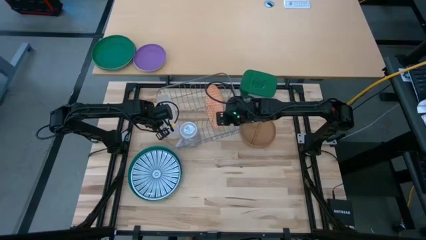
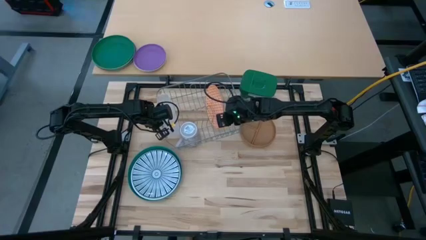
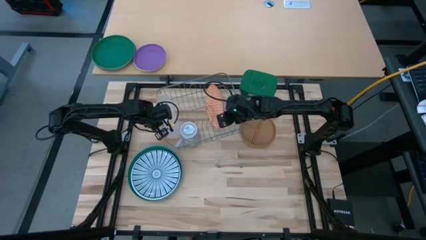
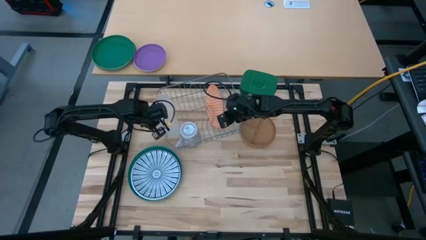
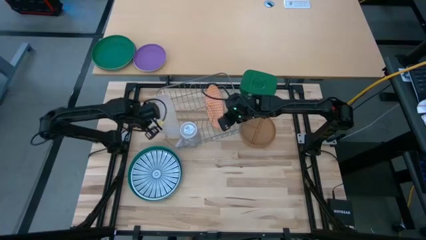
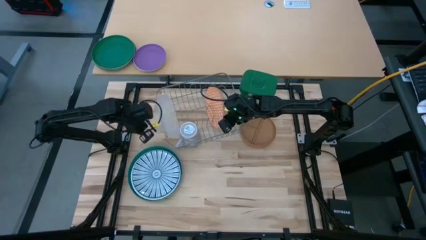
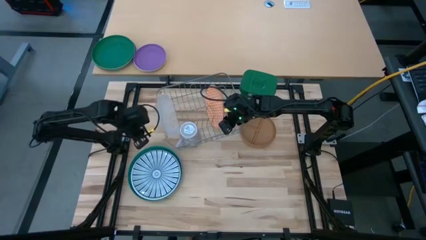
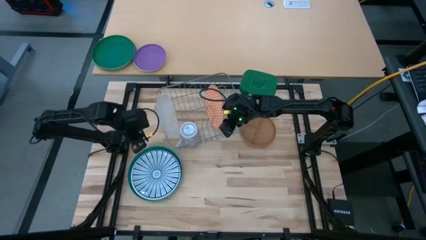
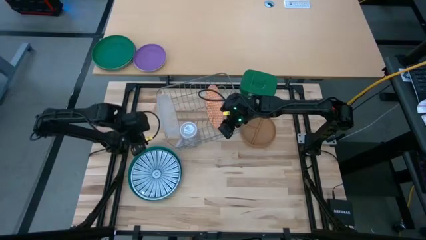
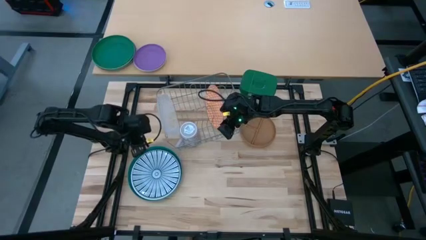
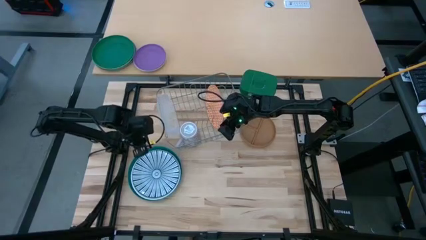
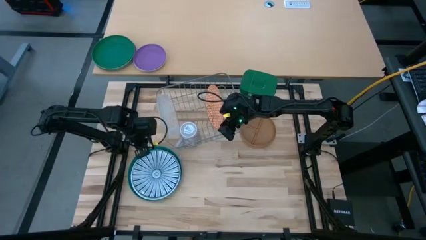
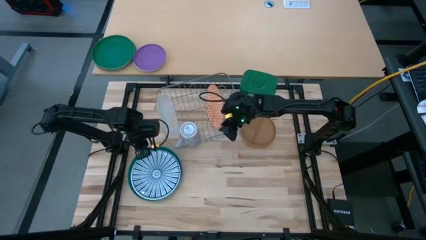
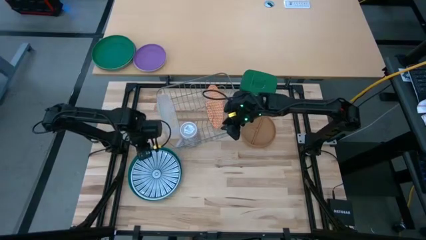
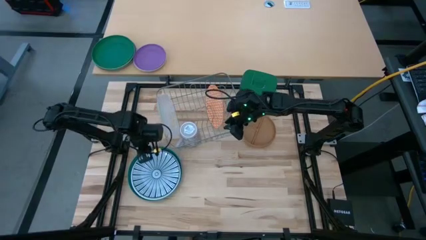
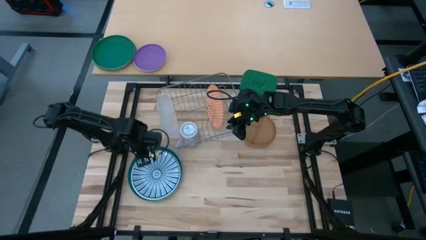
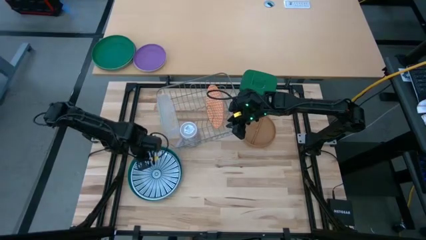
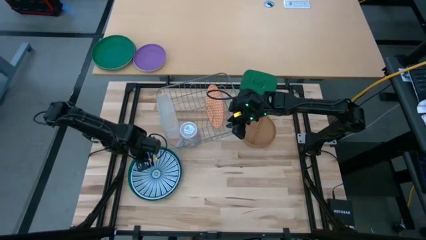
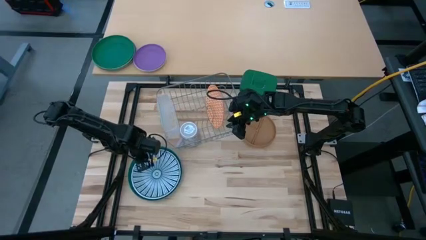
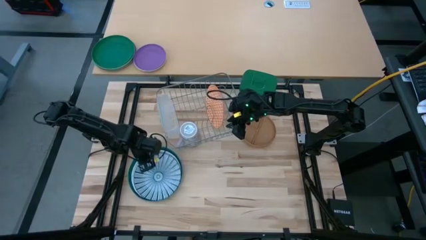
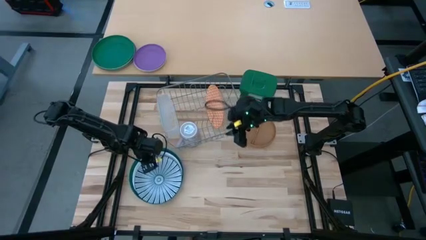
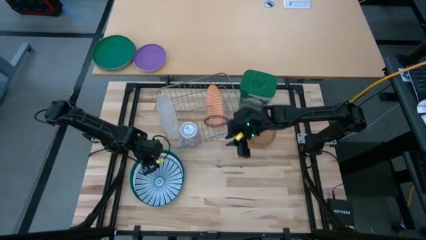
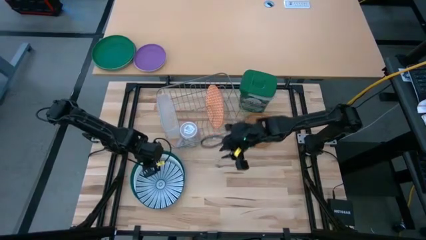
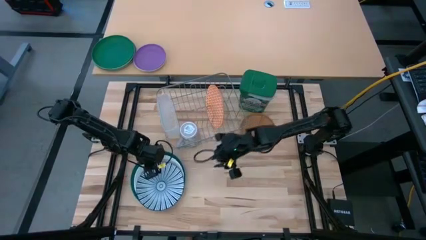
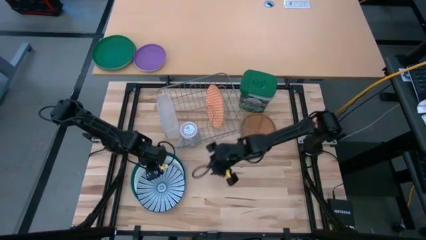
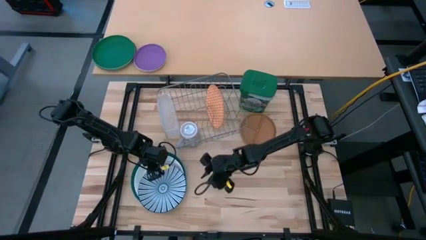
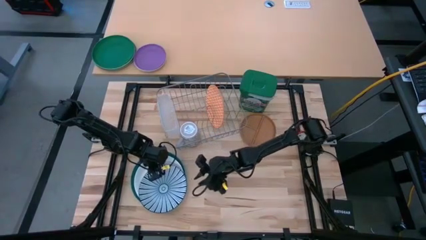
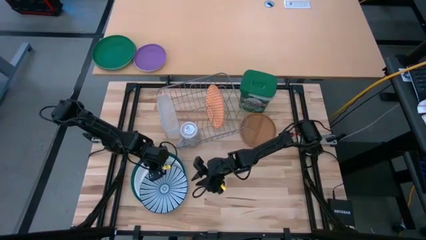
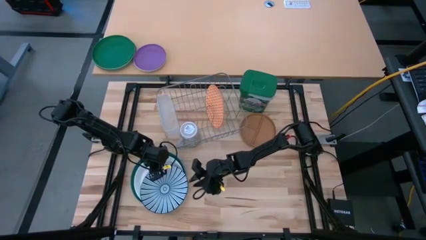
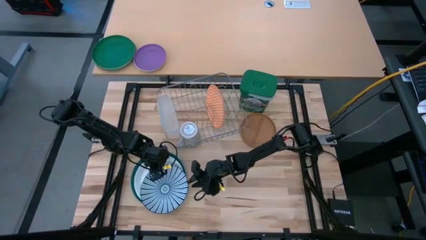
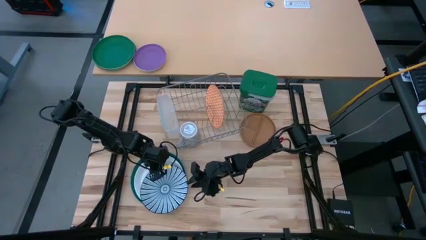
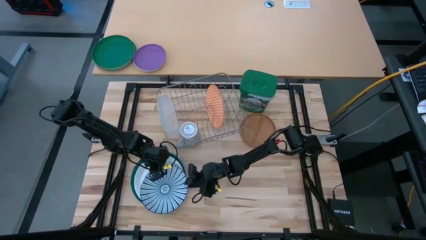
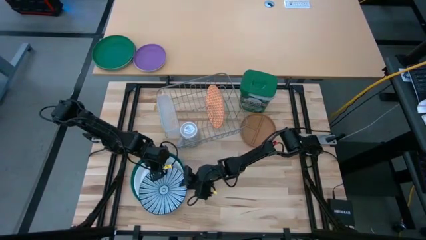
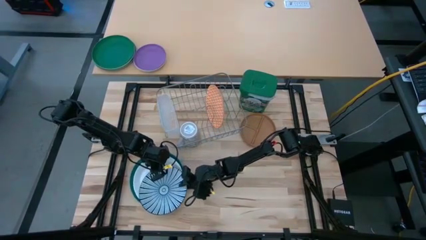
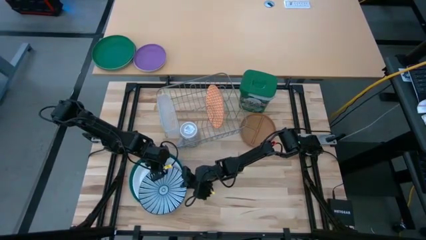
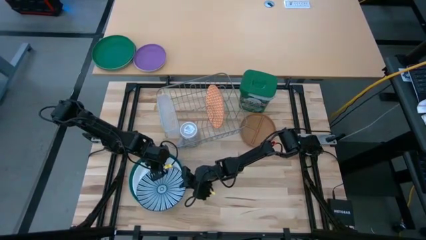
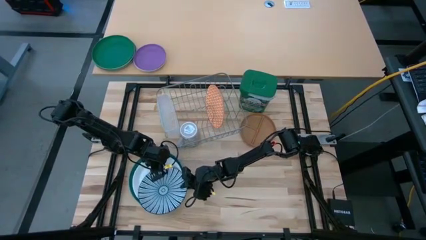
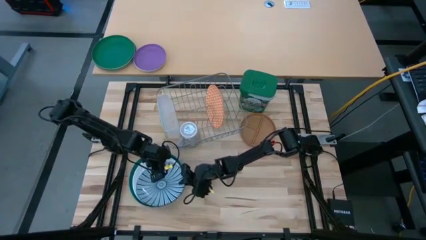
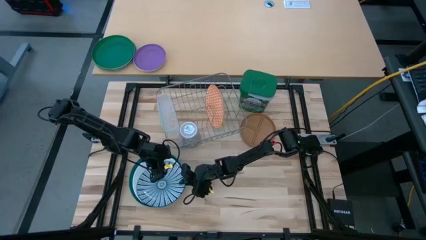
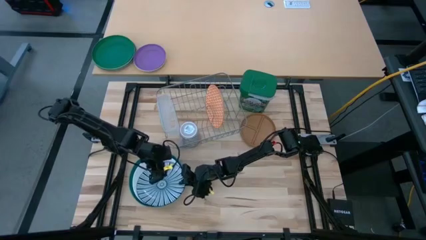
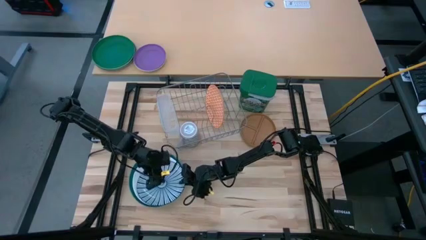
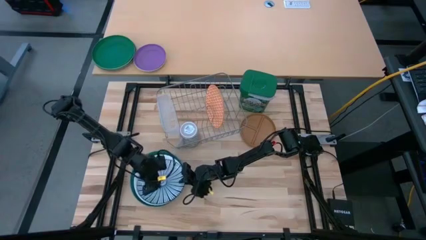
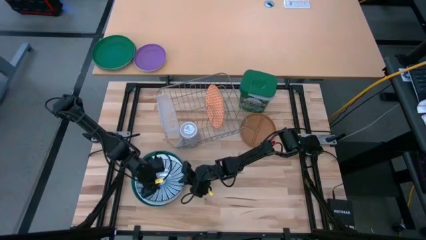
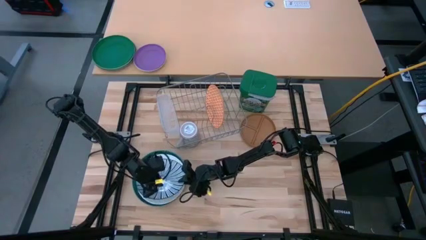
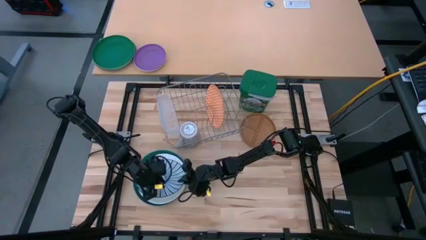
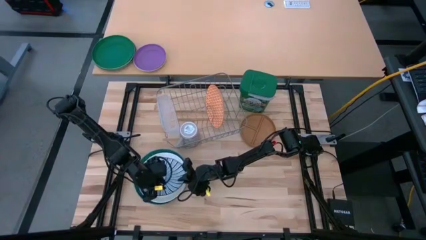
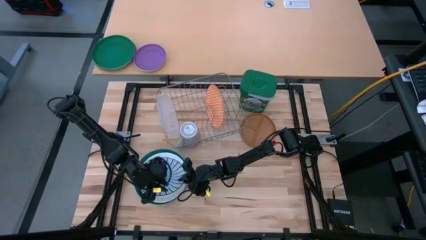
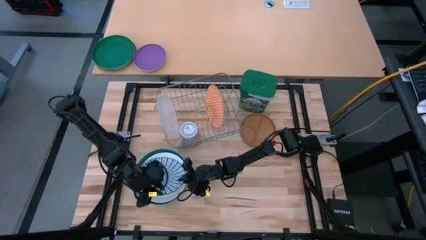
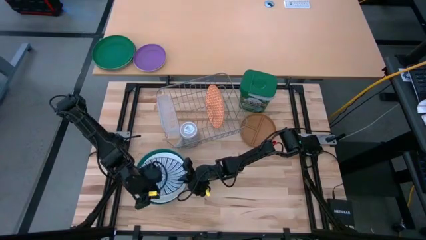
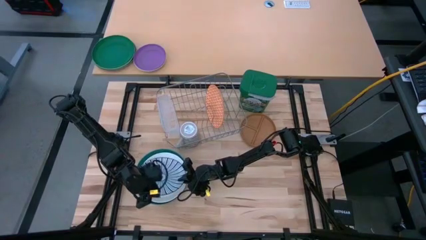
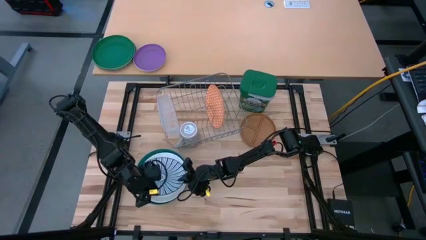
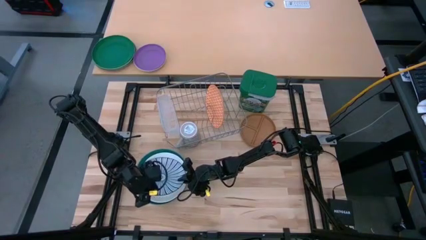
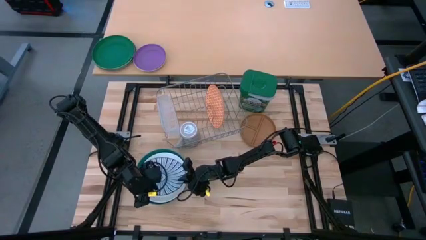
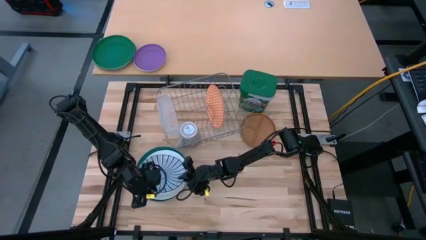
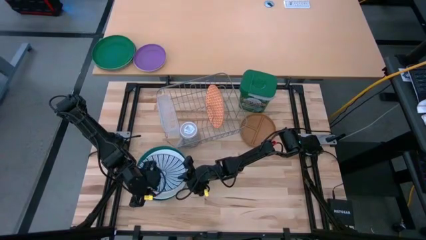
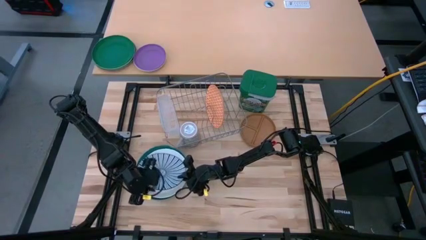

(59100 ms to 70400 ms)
Task: Sort dishes
Put the blue and white plate in the dish rack

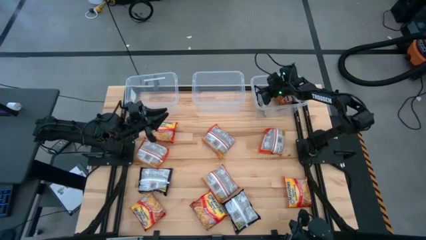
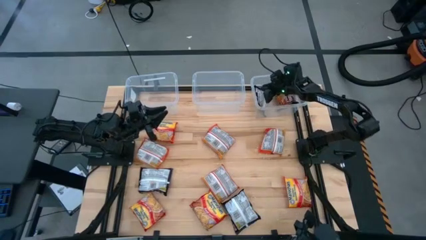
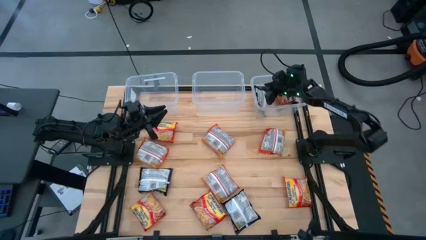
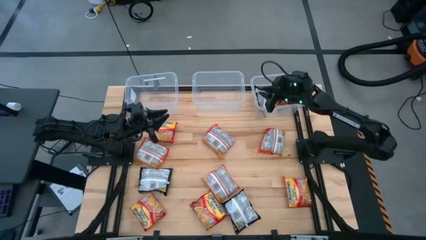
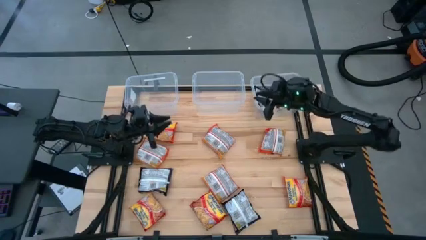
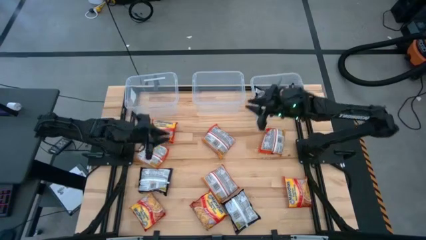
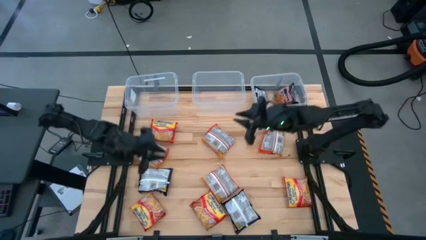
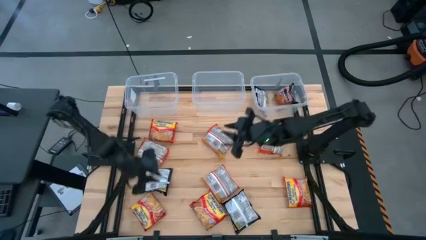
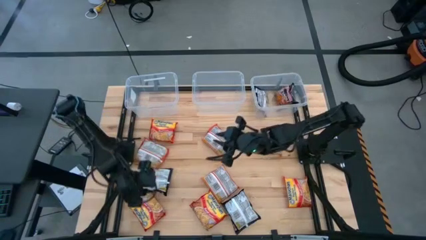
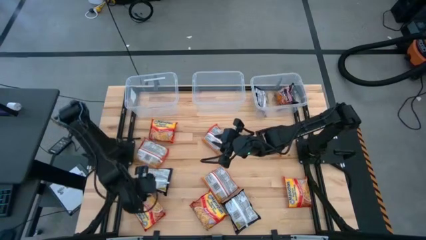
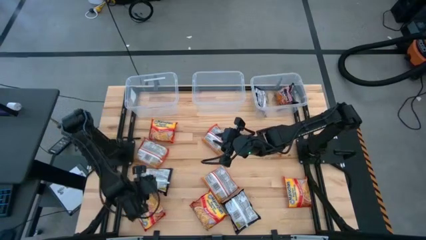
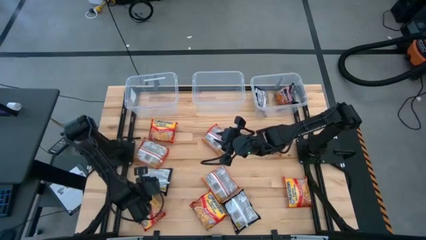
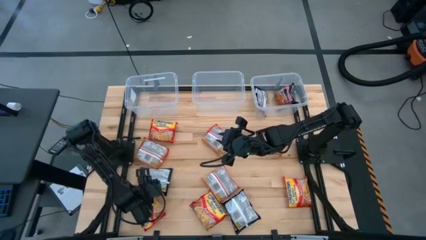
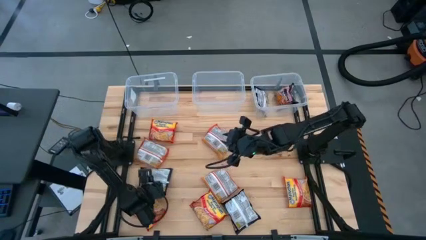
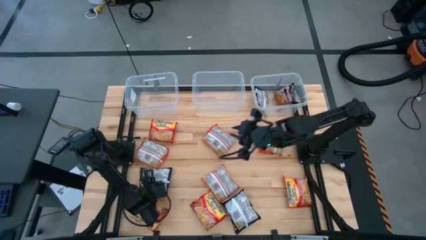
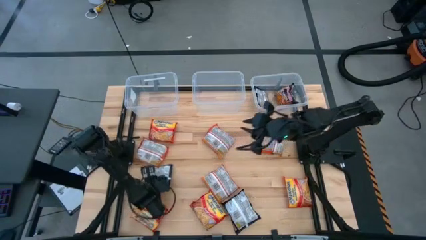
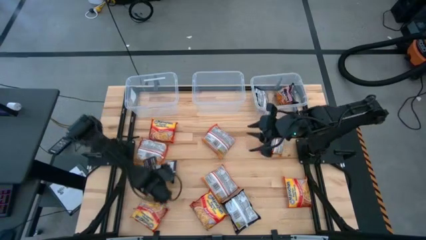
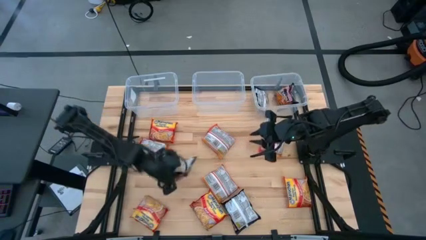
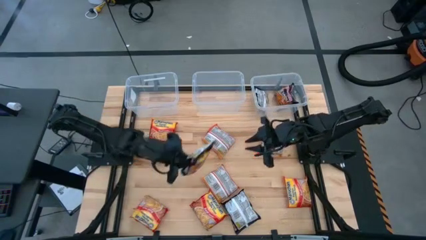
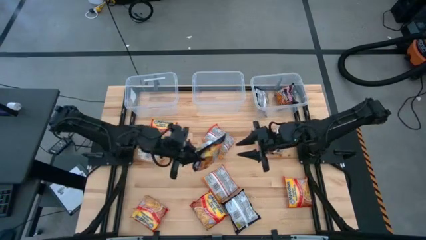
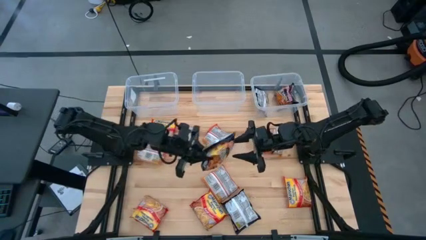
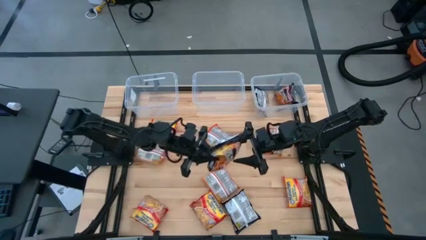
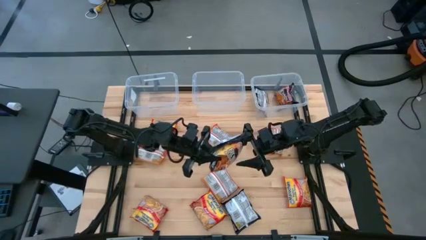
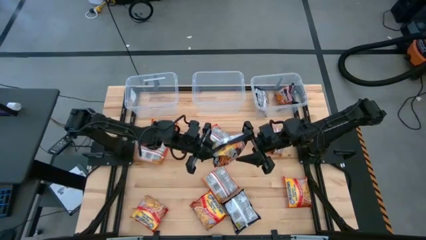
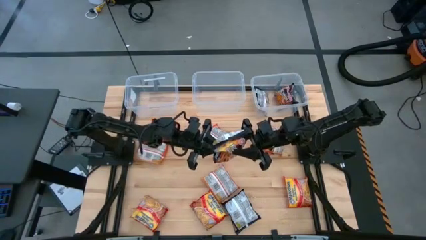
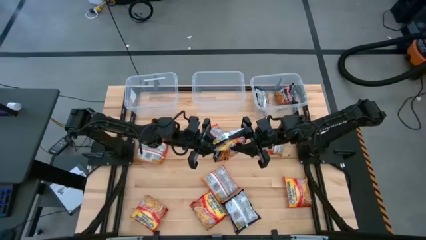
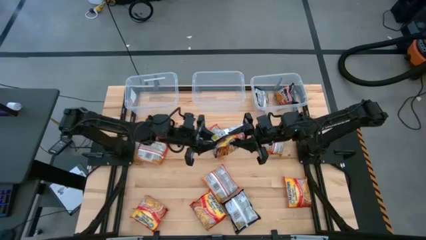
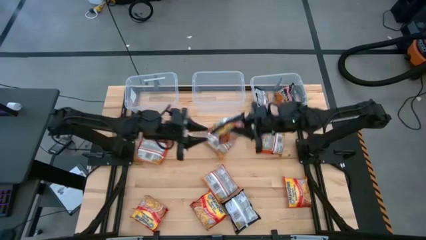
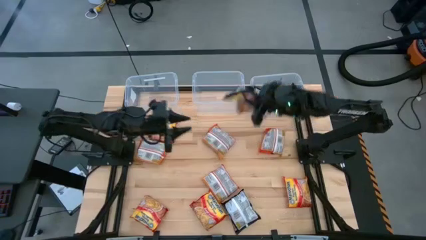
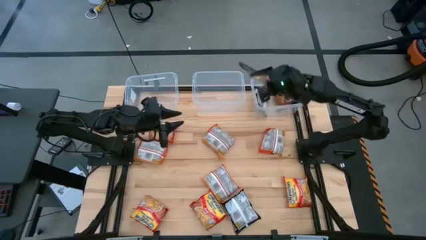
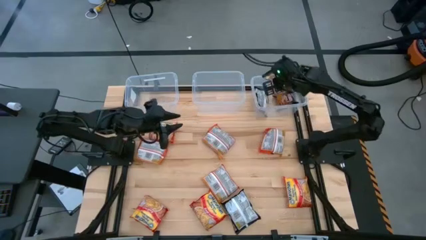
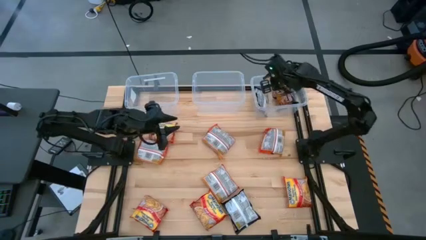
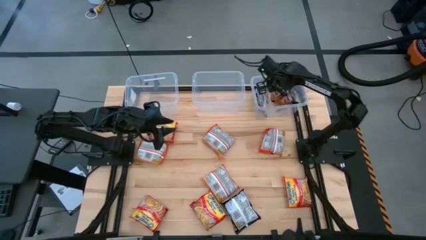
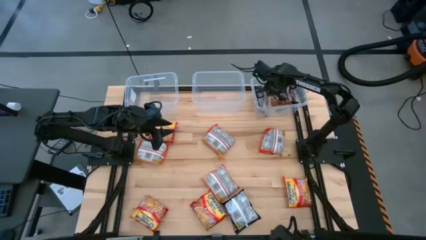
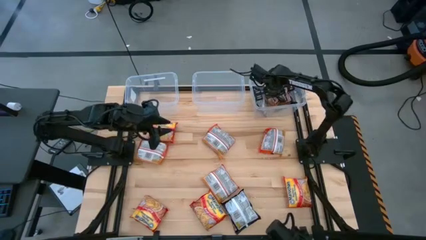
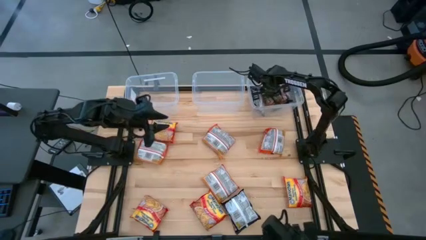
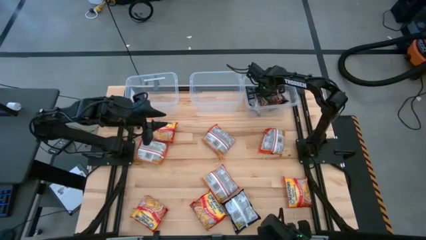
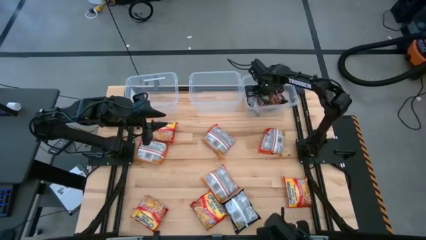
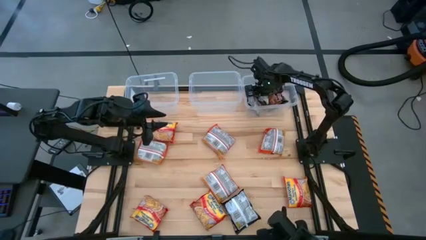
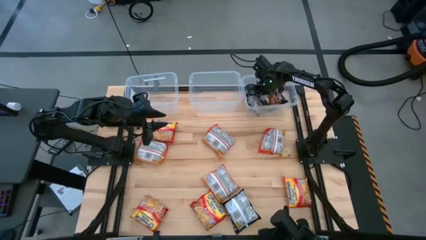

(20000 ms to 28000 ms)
Task: Sort Maruchan noodles
Put the black noodle pack into the top right transparent bin
